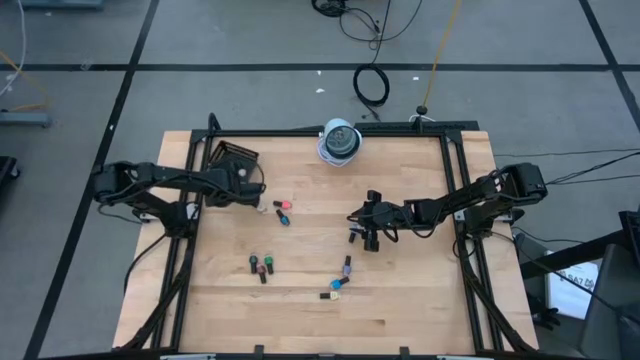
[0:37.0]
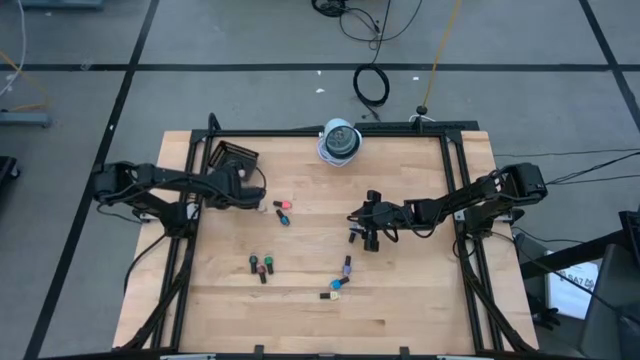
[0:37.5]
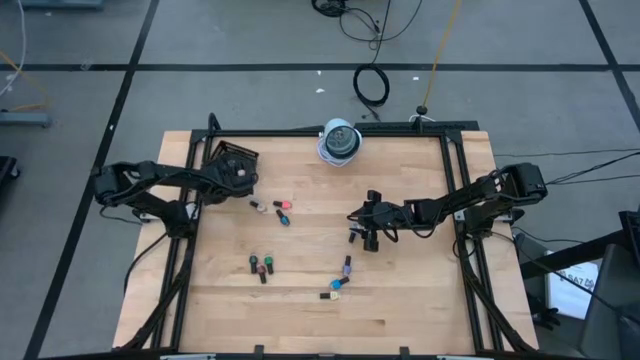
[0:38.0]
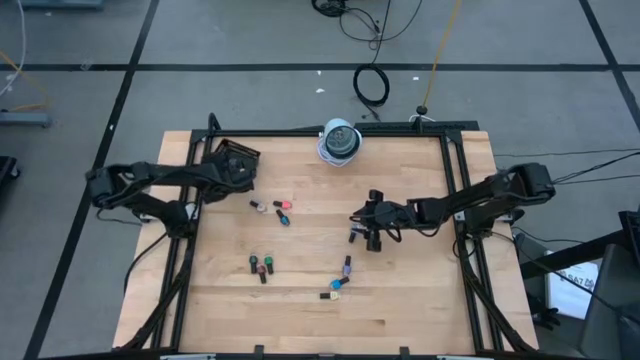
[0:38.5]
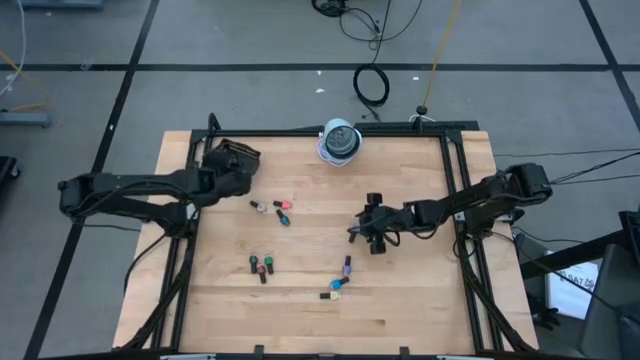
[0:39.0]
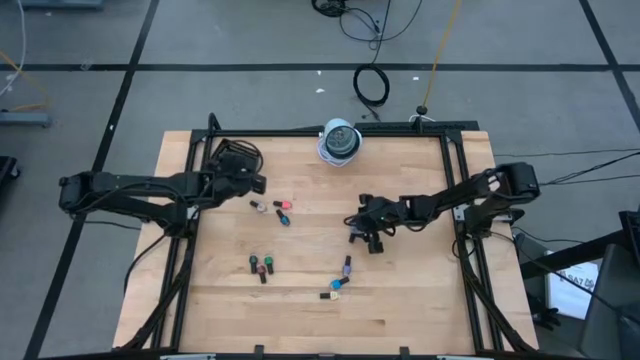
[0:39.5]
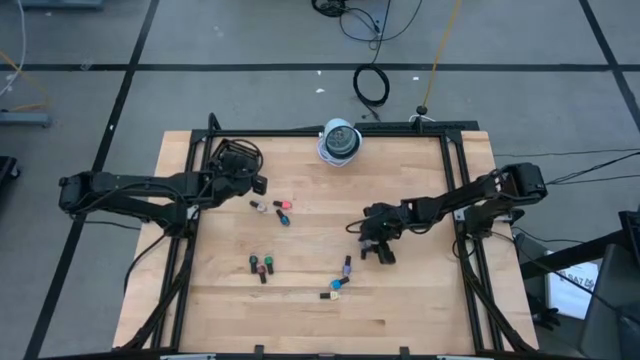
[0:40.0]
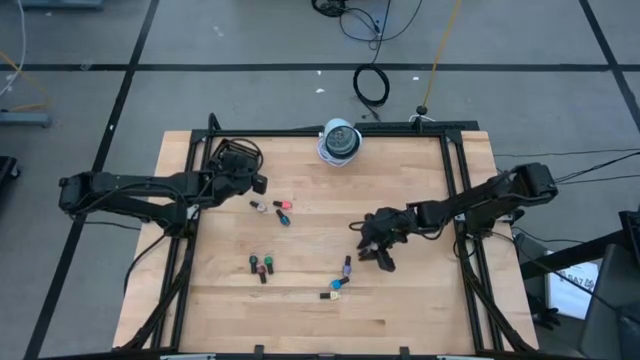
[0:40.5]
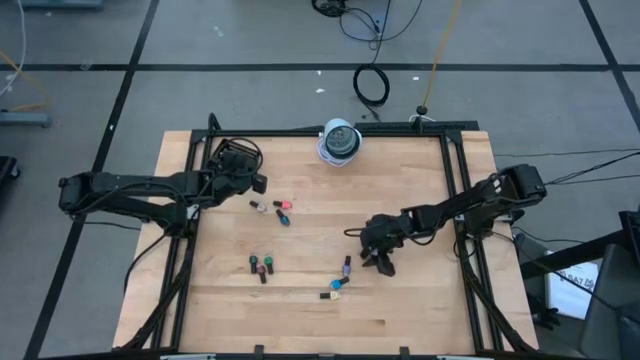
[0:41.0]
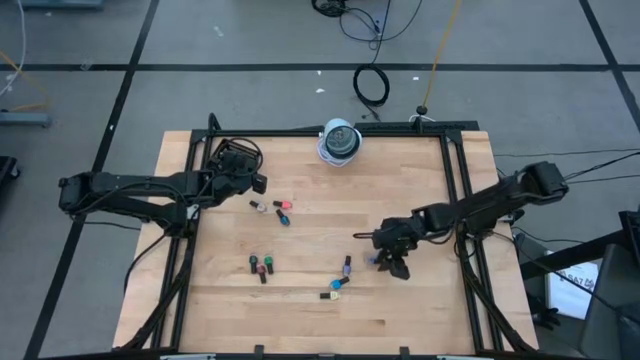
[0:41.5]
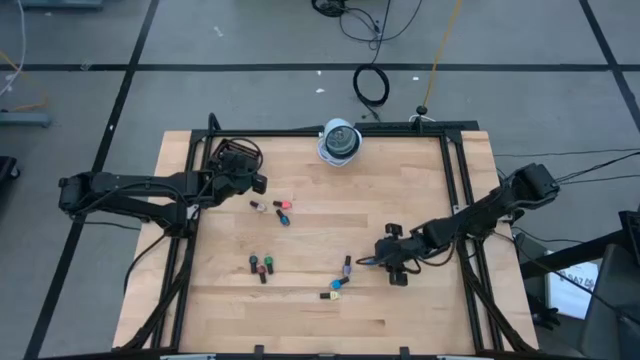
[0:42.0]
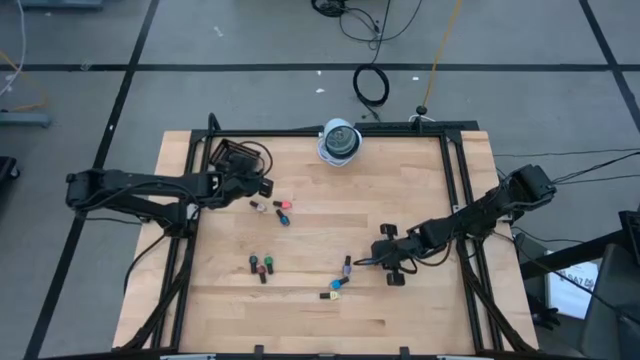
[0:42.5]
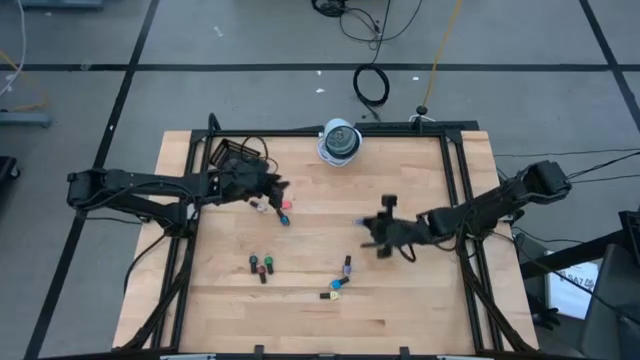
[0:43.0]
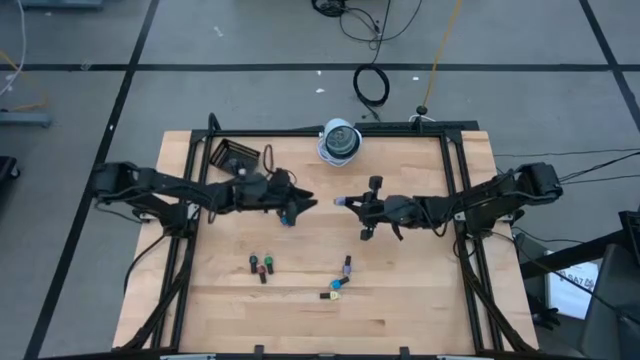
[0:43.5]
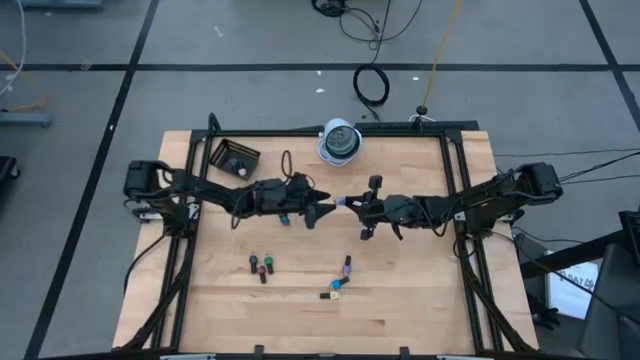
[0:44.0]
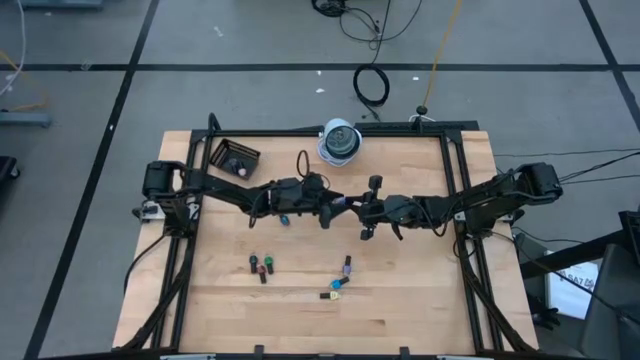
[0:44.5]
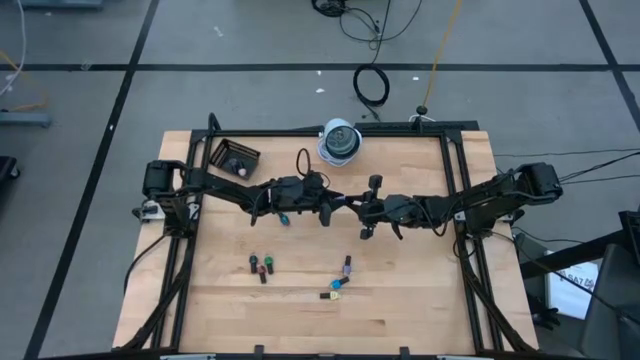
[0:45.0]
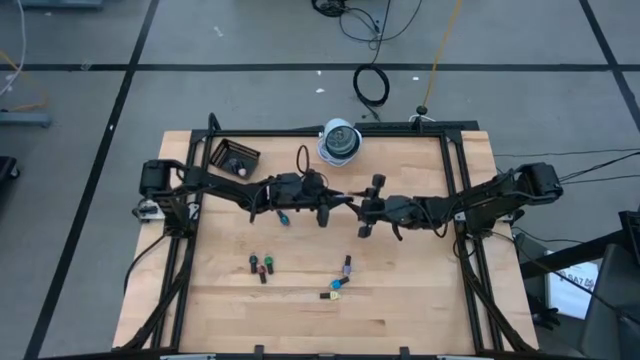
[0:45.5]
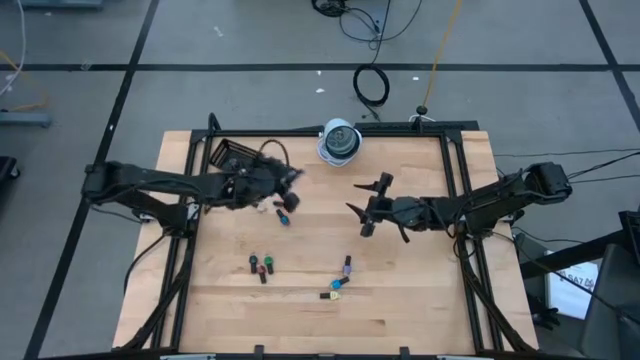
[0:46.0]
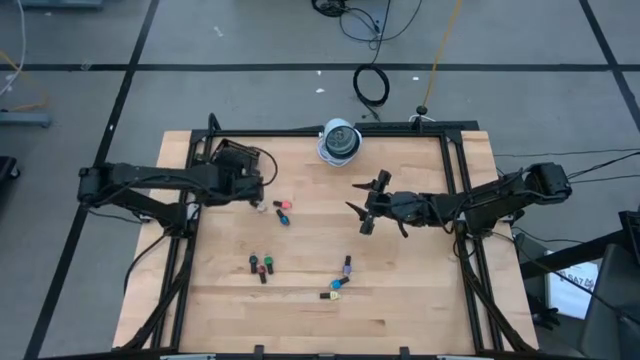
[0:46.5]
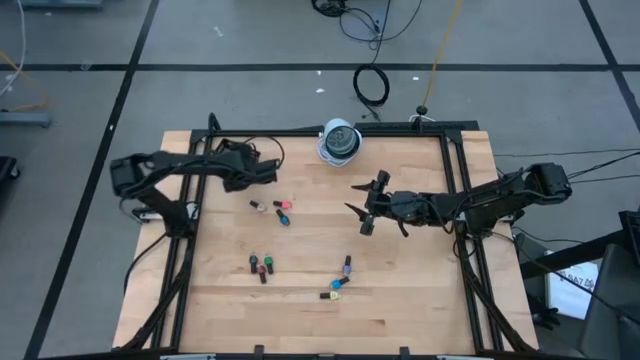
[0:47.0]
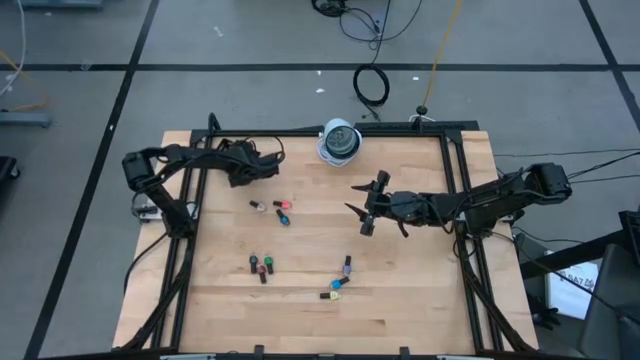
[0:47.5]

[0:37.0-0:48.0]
Task: Pick & Place Nail Polish
Put the steel blue nail polish bottle into the black basket

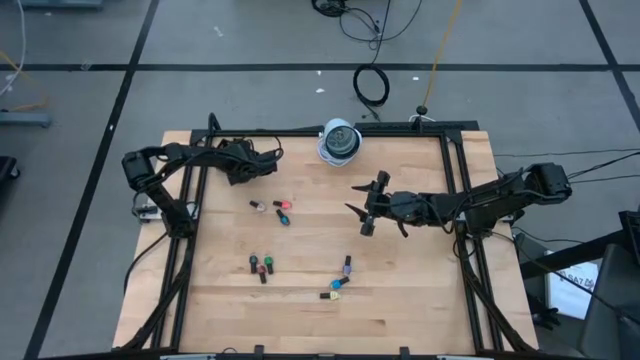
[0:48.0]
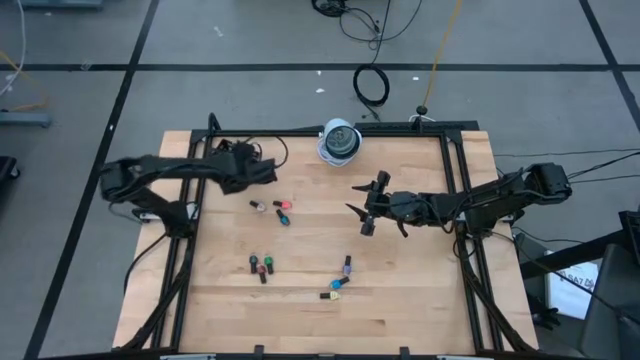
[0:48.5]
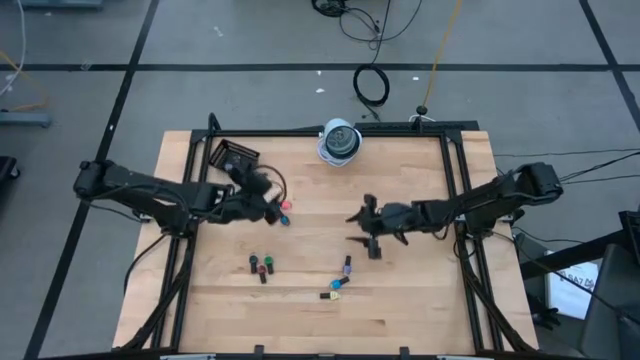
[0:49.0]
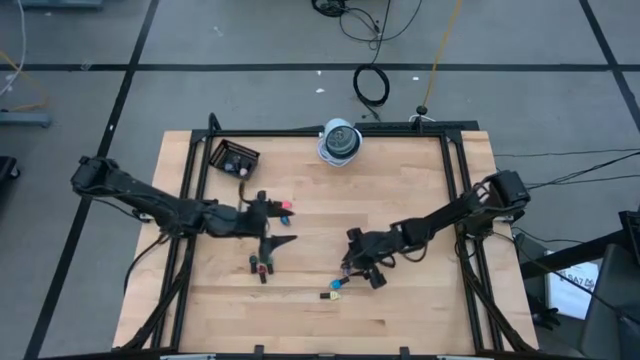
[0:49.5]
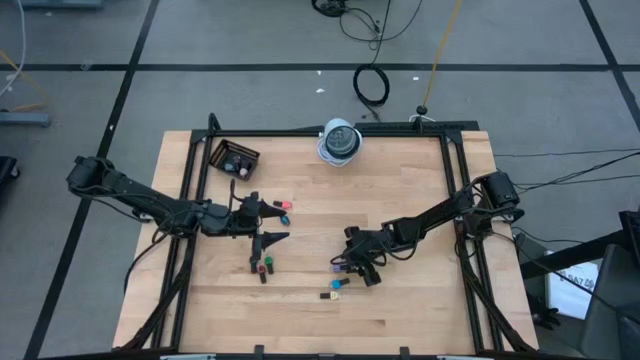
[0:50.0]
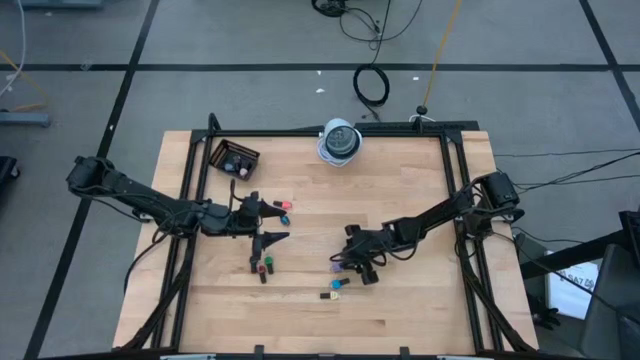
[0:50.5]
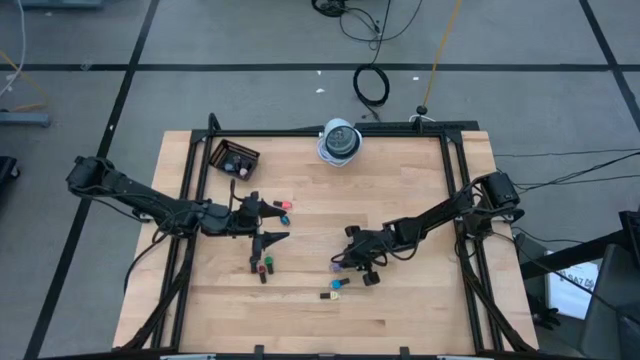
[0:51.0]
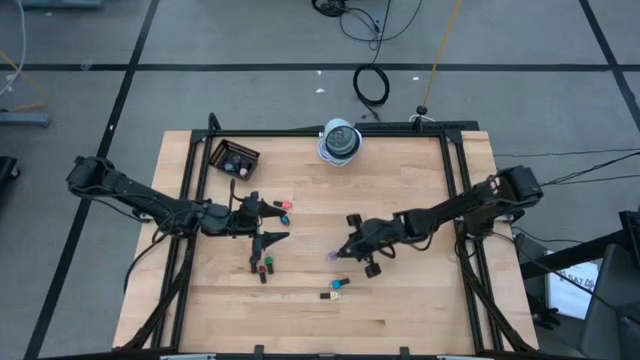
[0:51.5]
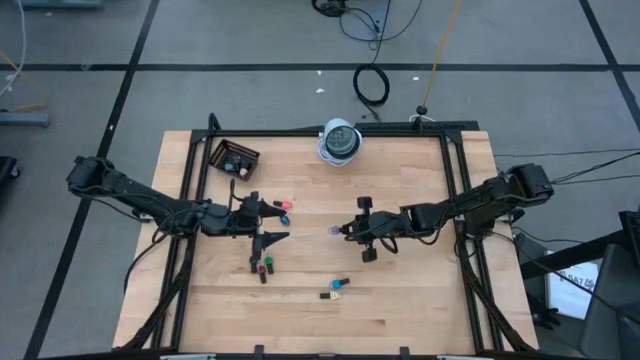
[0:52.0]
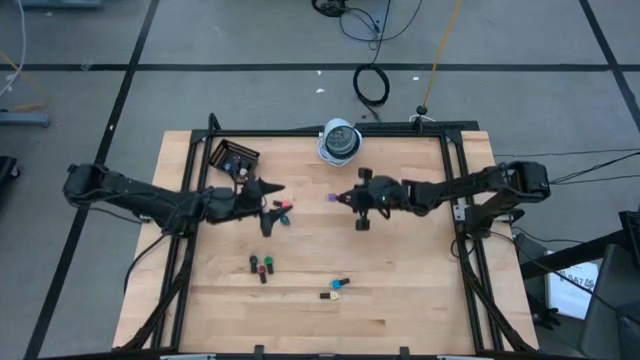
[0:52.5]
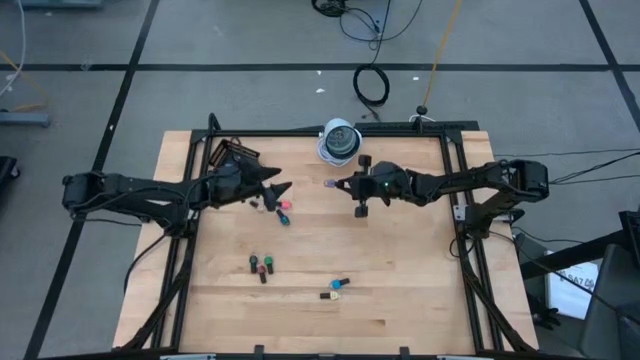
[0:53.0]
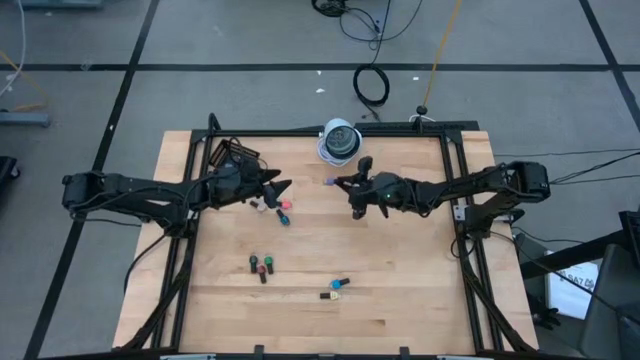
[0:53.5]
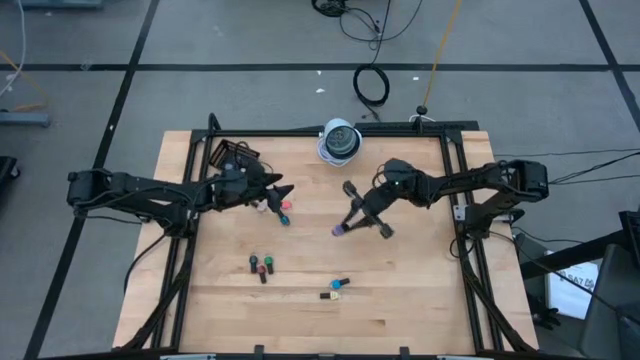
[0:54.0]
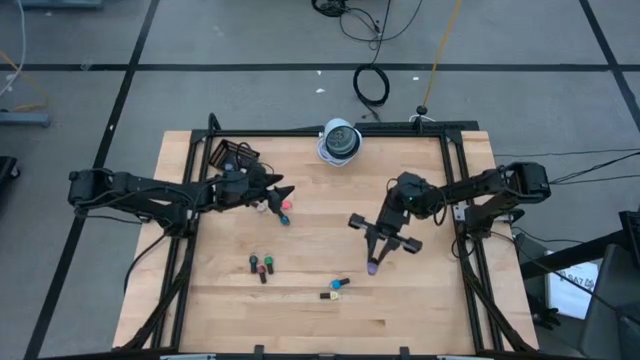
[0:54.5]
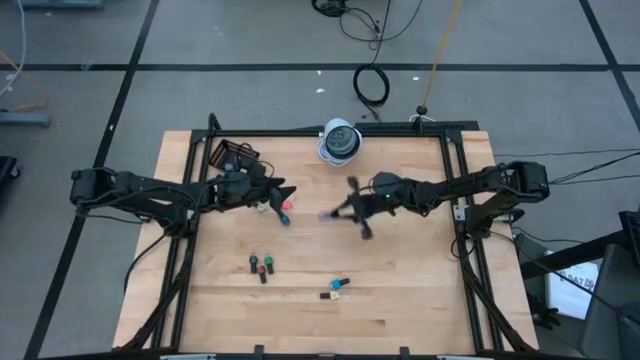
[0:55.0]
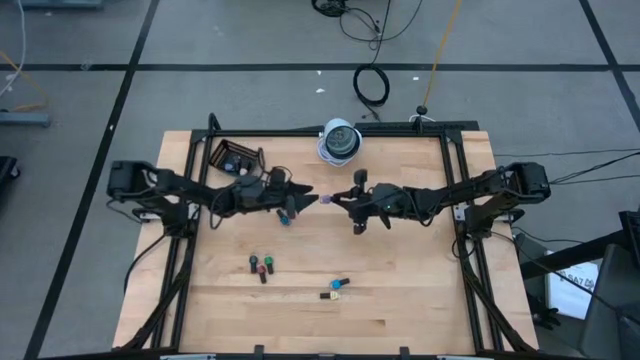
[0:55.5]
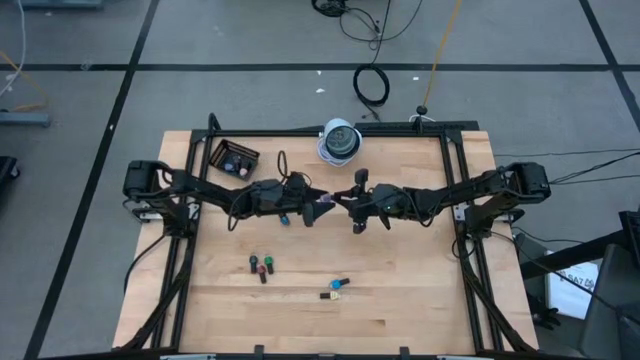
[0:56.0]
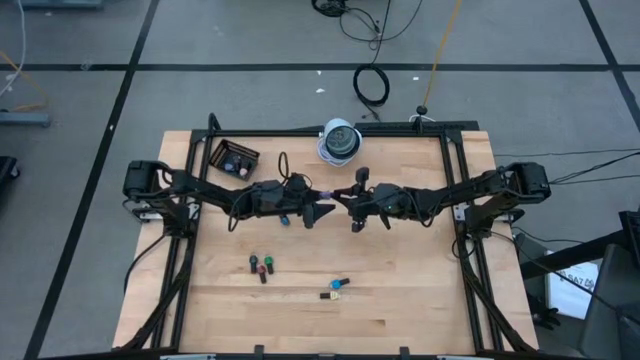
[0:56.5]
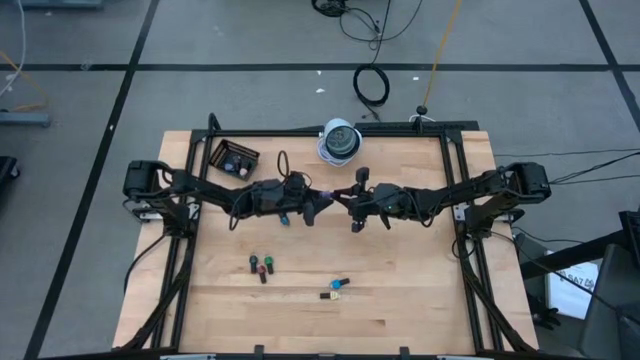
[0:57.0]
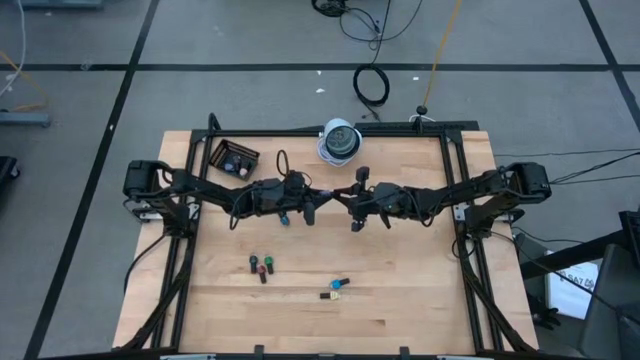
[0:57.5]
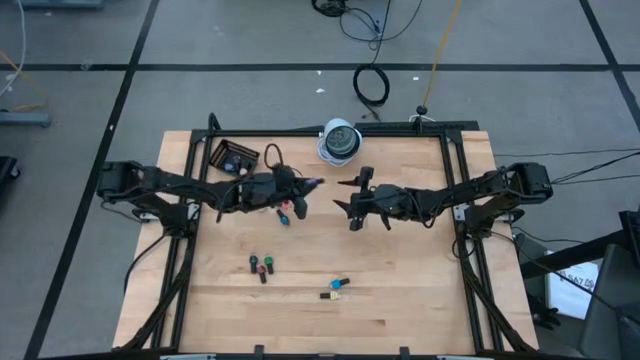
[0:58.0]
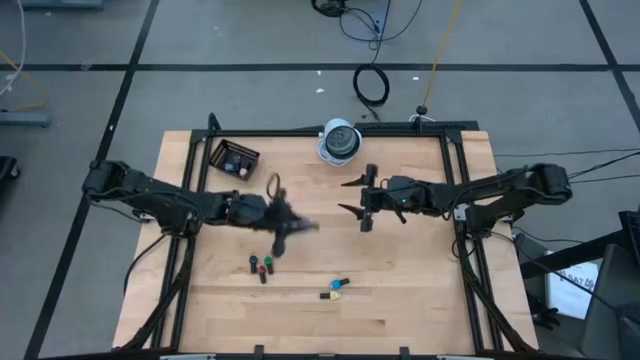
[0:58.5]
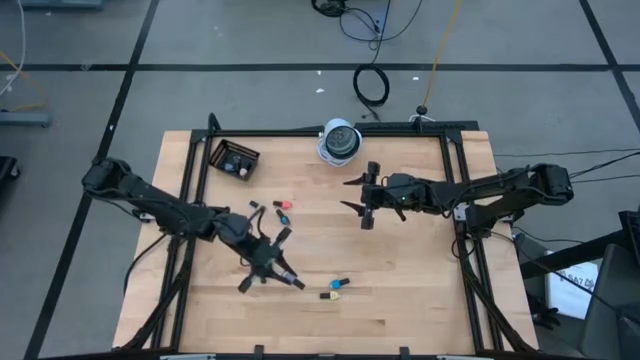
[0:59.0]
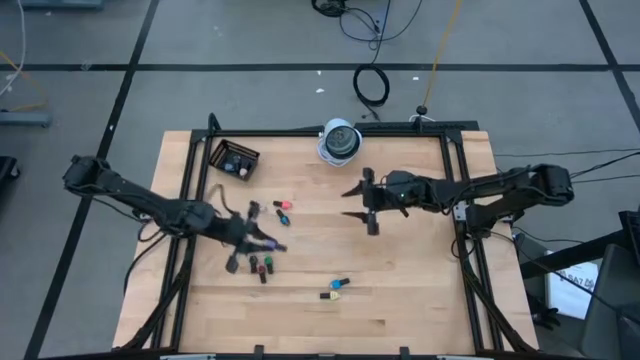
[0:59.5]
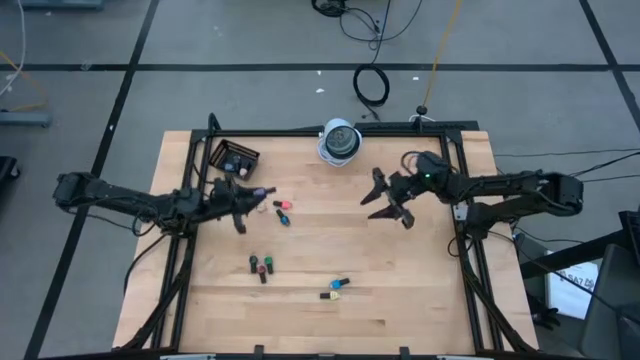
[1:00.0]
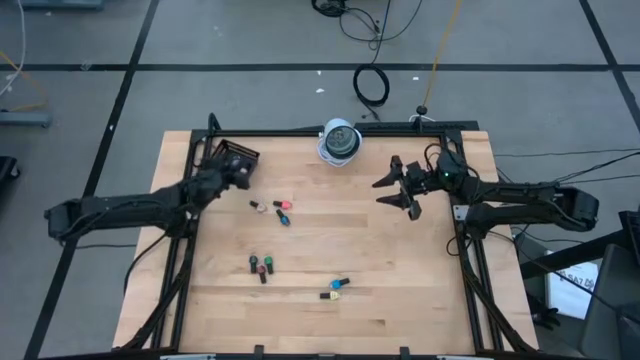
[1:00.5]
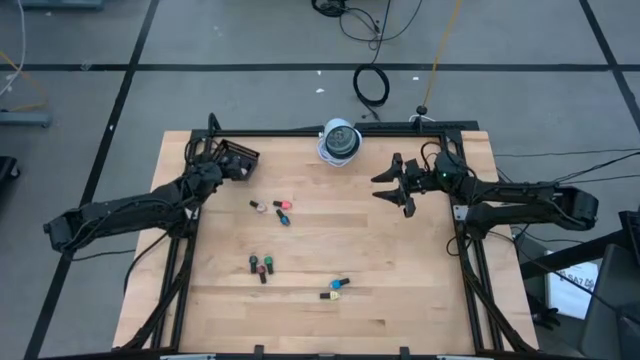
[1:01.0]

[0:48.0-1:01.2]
Put the purple nail polish bottle into the black basket
